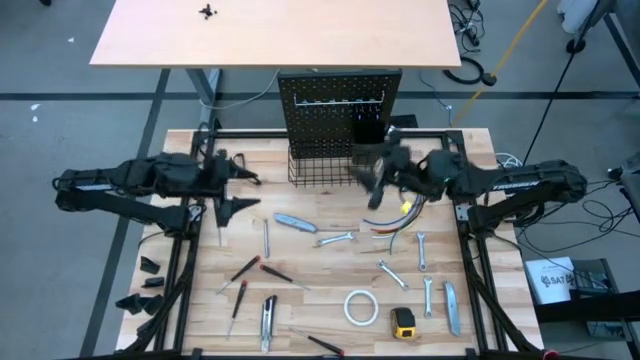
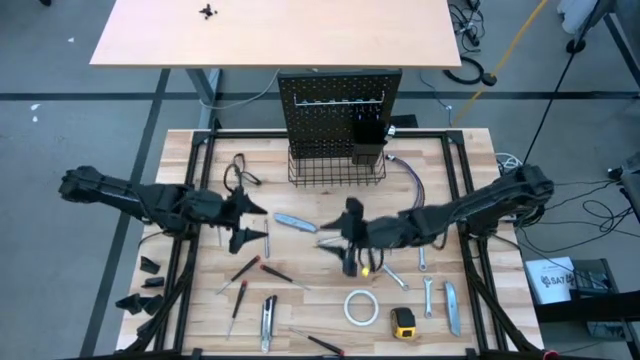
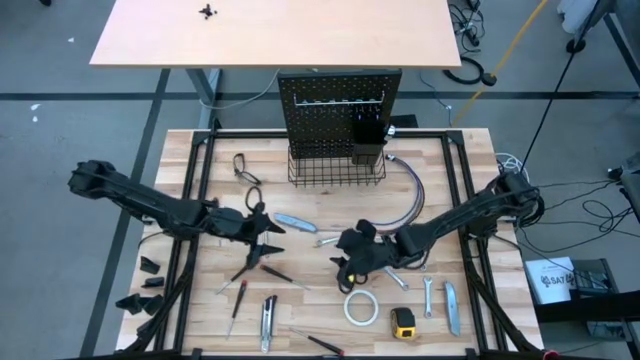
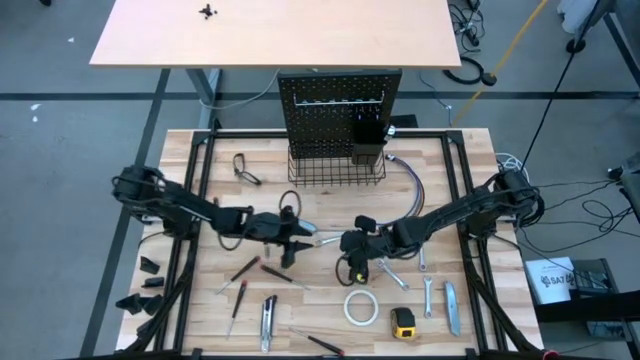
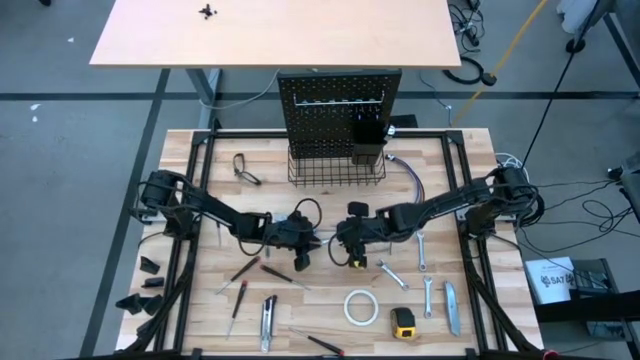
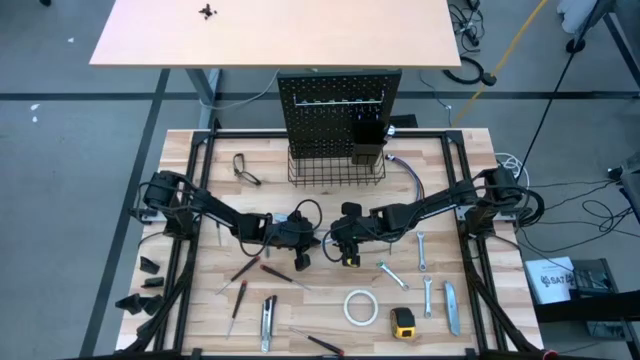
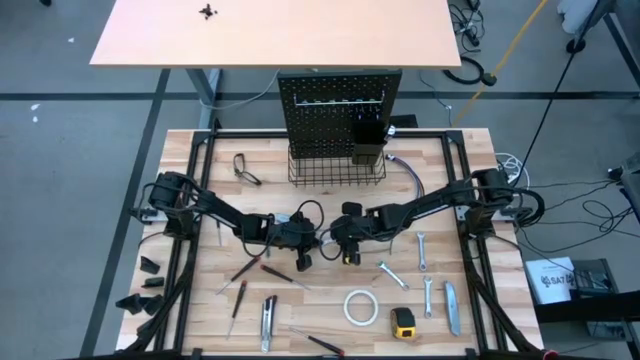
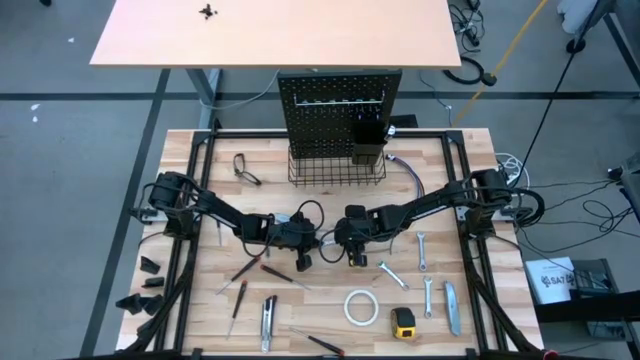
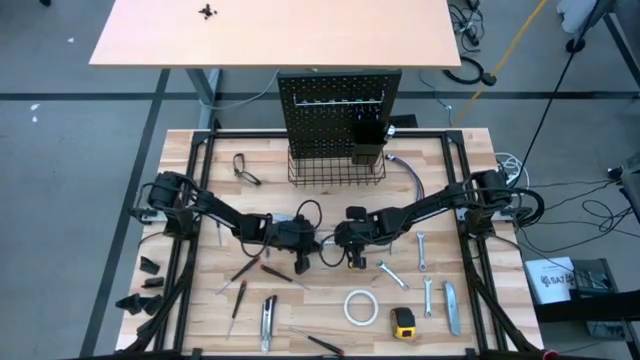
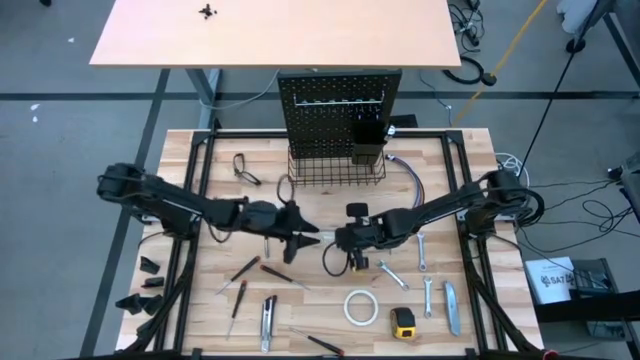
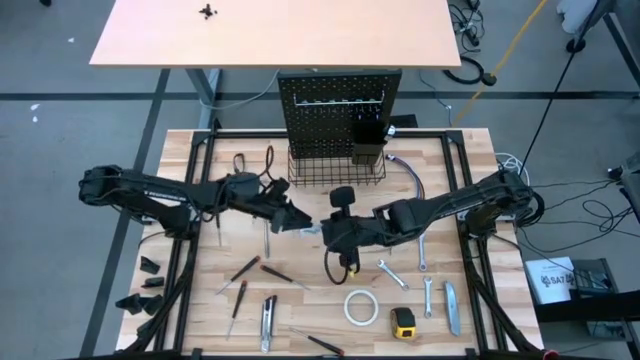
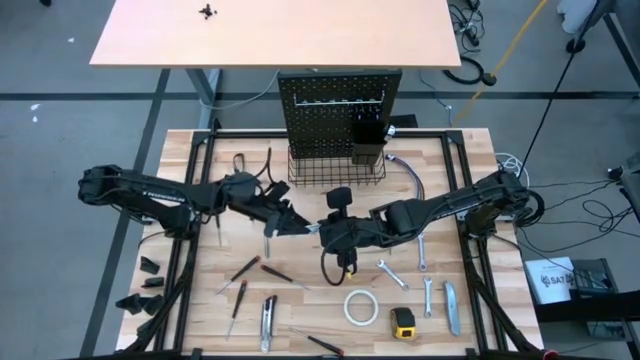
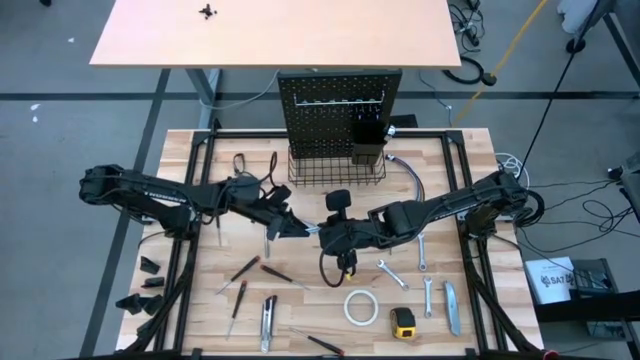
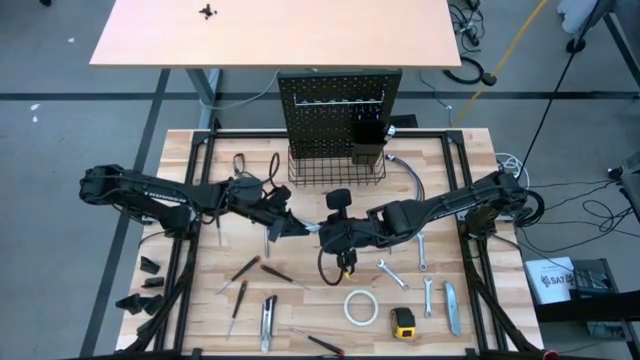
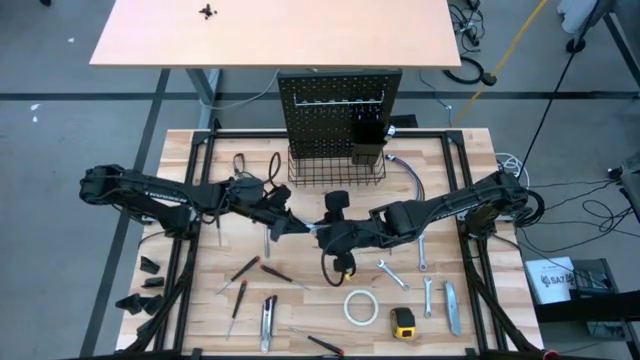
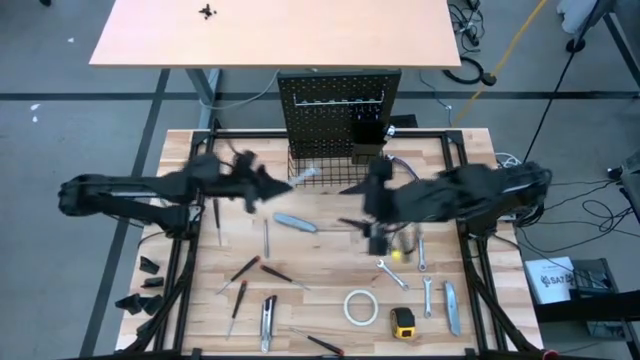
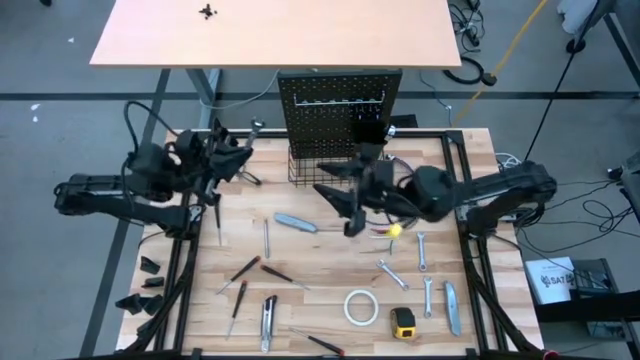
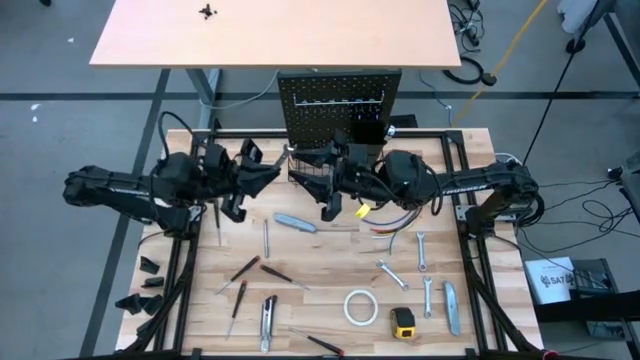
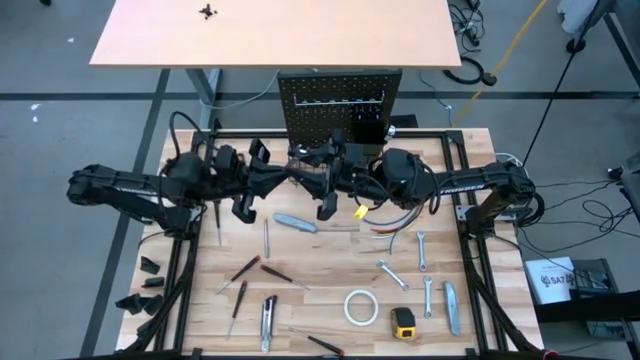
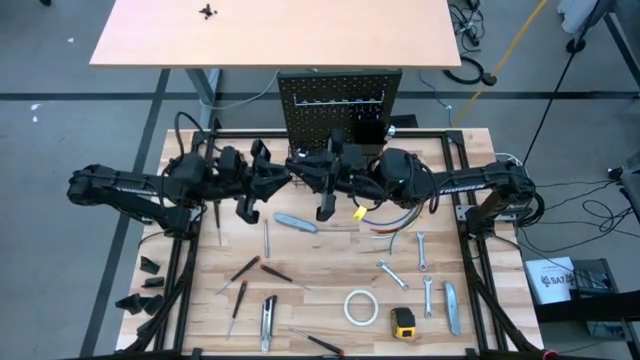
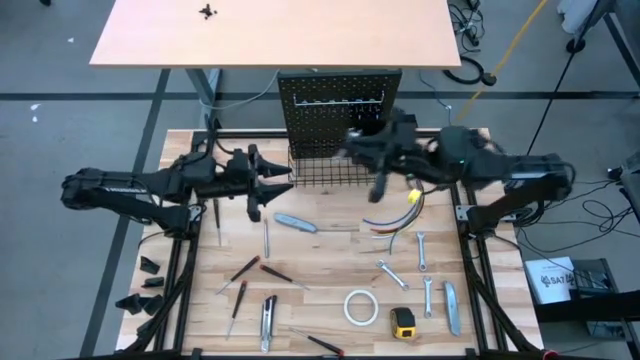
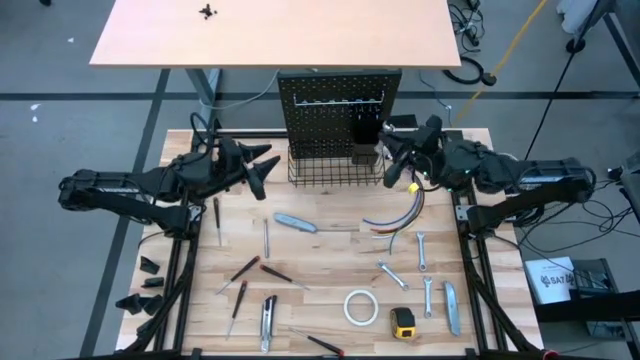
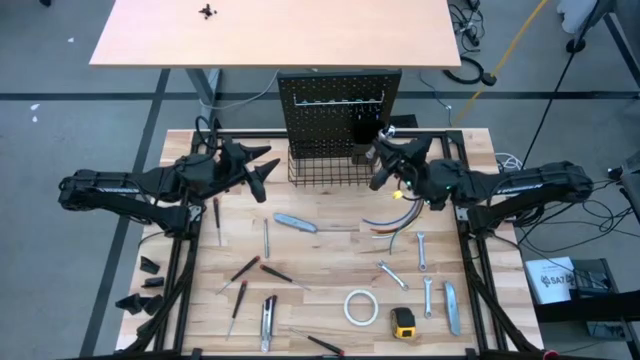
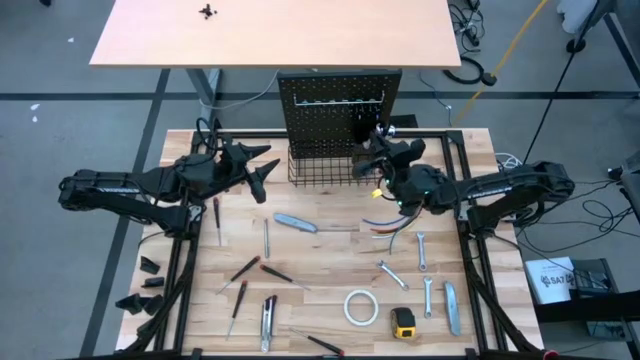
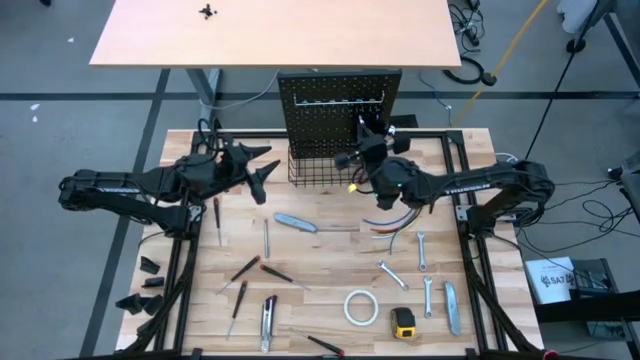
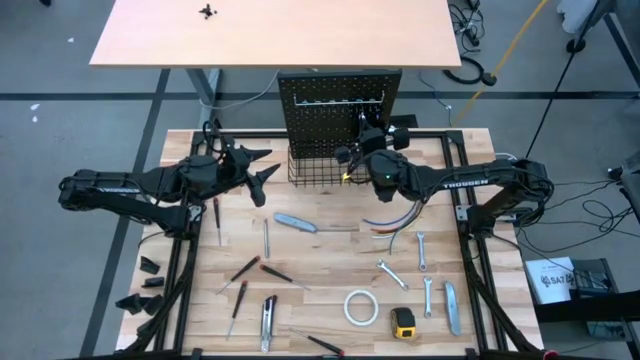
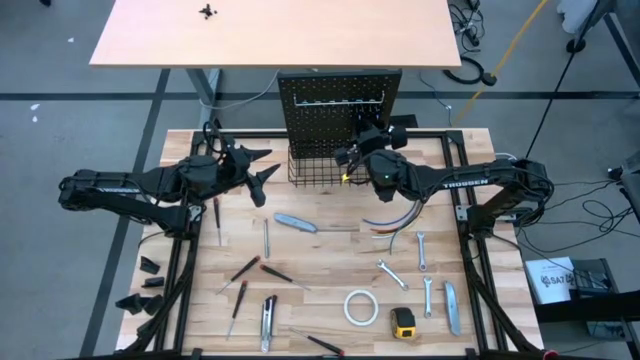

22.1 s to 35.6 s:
Task: Hang tools onto peg board
Put the wrench into the black bin on the pegboard
